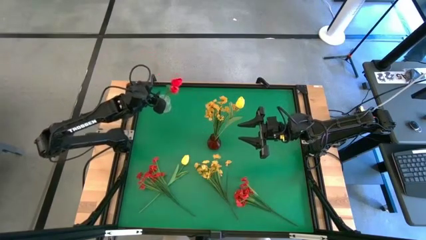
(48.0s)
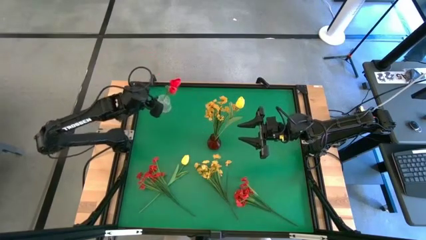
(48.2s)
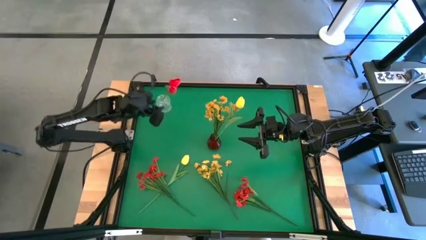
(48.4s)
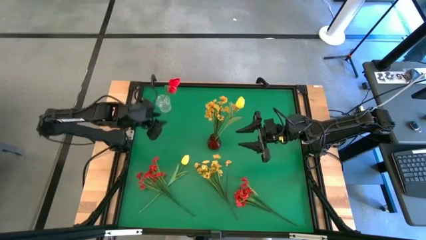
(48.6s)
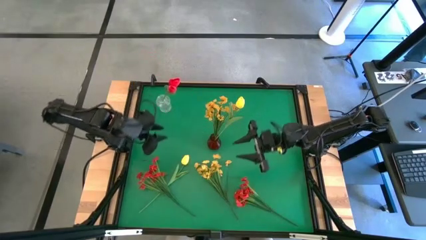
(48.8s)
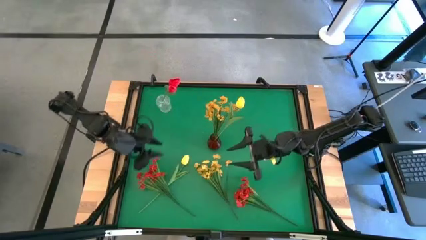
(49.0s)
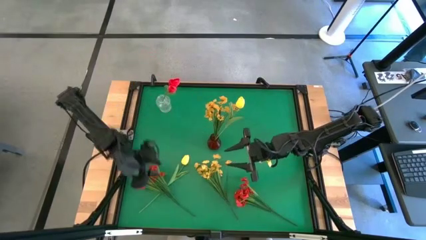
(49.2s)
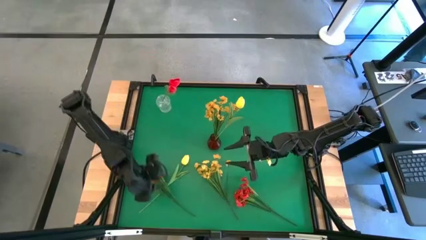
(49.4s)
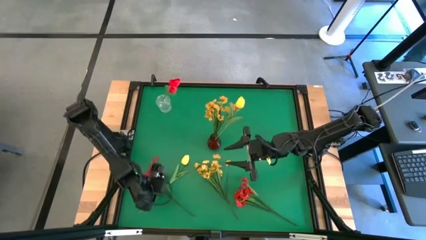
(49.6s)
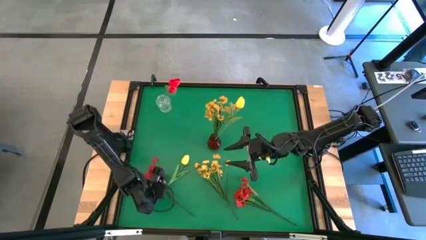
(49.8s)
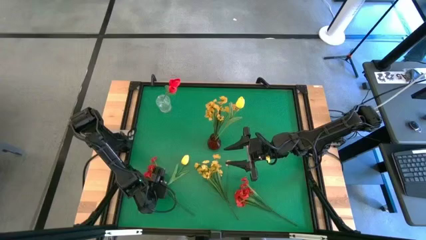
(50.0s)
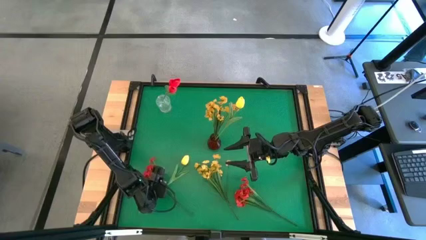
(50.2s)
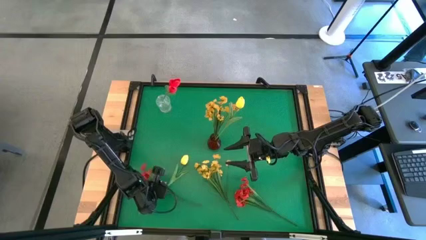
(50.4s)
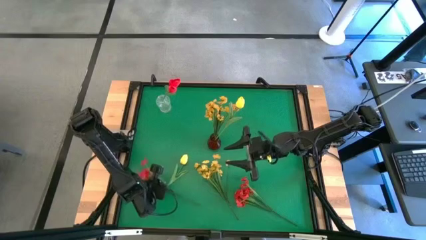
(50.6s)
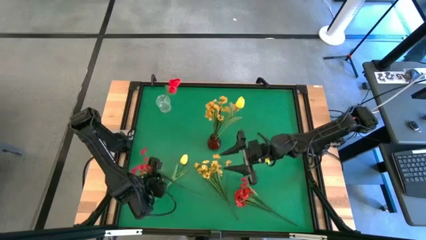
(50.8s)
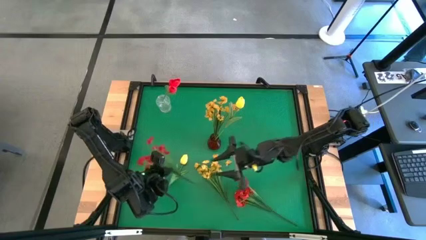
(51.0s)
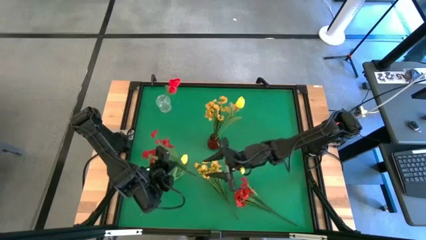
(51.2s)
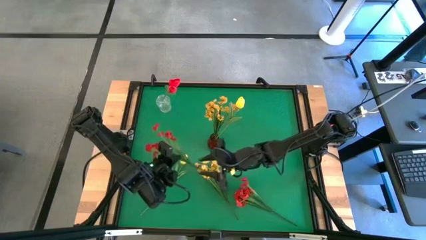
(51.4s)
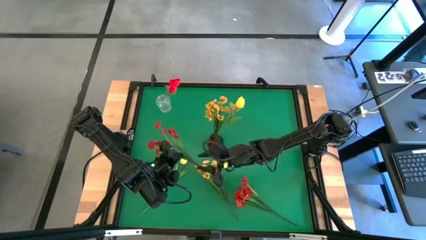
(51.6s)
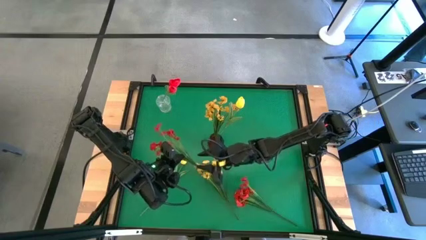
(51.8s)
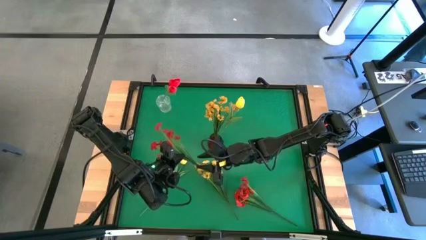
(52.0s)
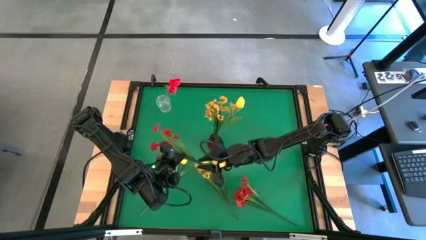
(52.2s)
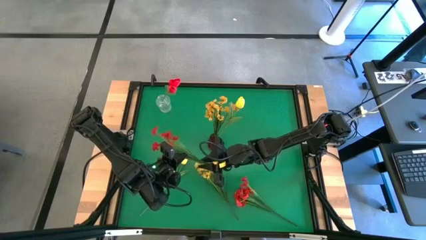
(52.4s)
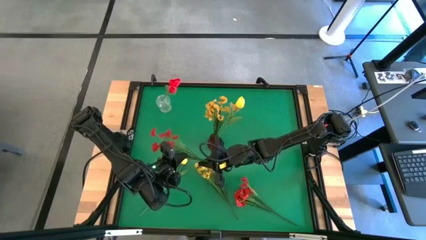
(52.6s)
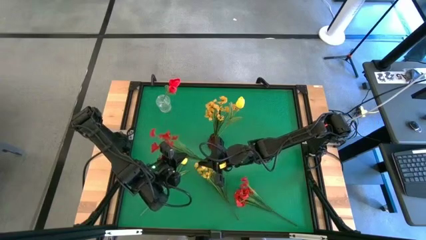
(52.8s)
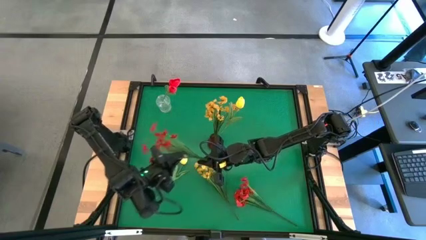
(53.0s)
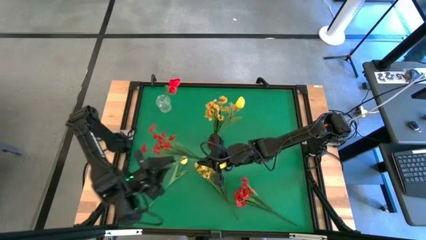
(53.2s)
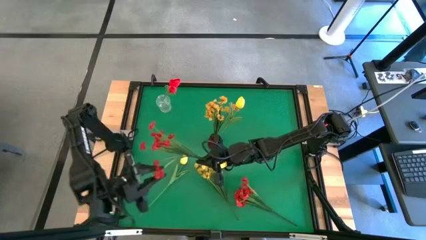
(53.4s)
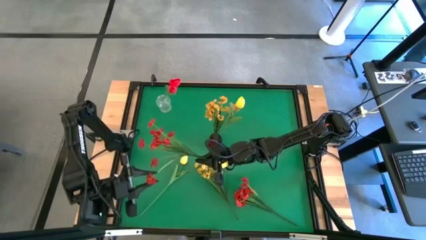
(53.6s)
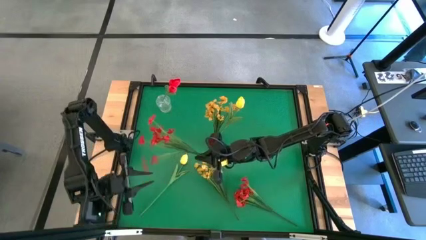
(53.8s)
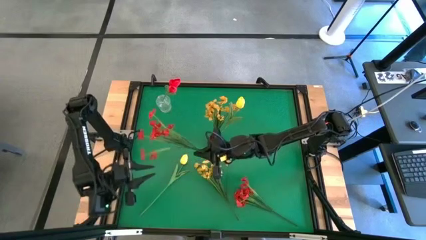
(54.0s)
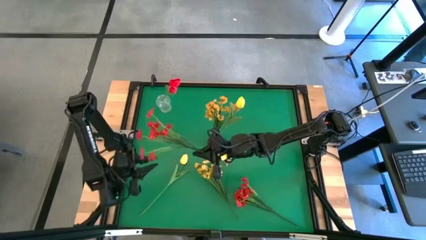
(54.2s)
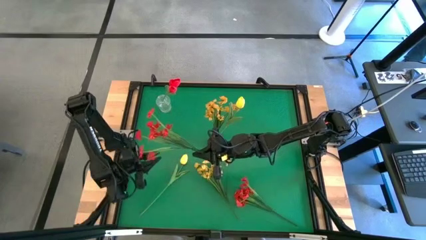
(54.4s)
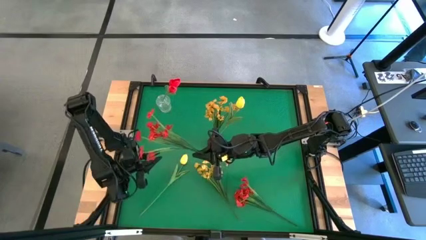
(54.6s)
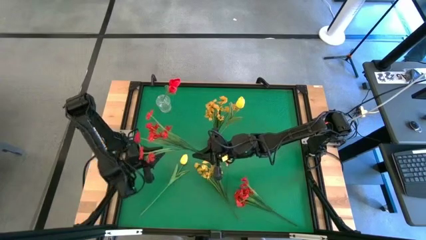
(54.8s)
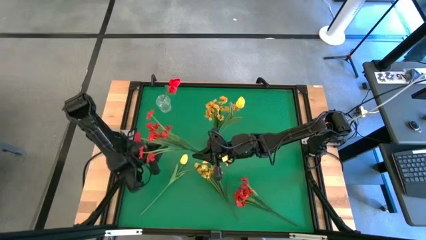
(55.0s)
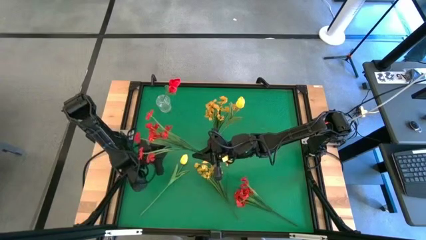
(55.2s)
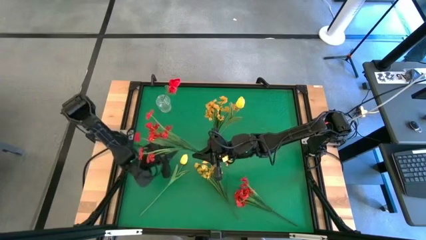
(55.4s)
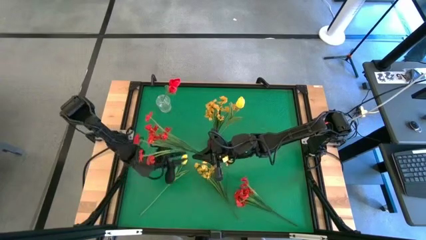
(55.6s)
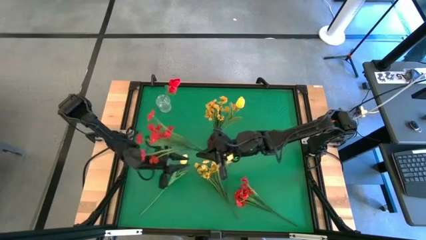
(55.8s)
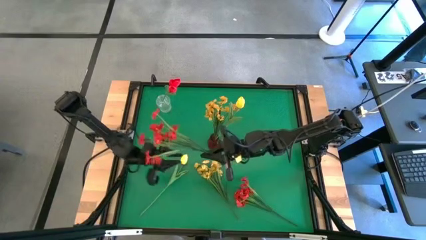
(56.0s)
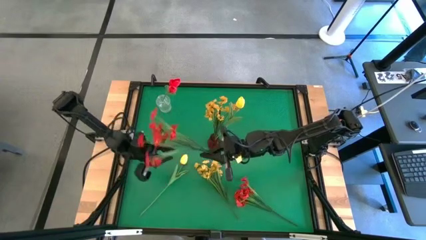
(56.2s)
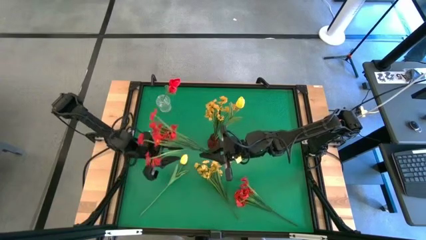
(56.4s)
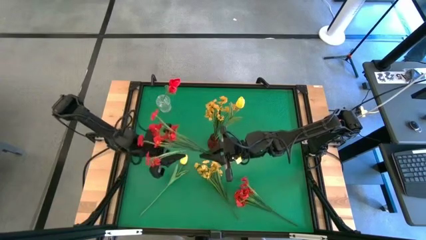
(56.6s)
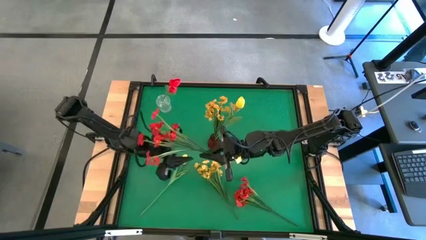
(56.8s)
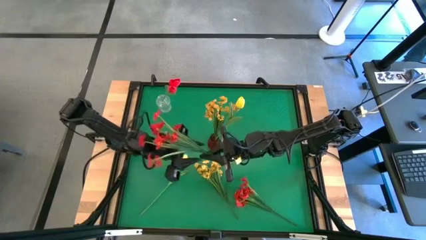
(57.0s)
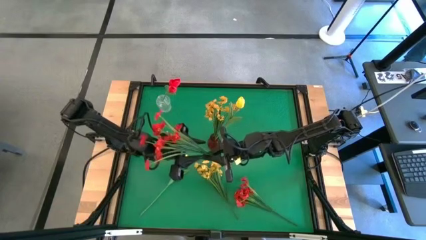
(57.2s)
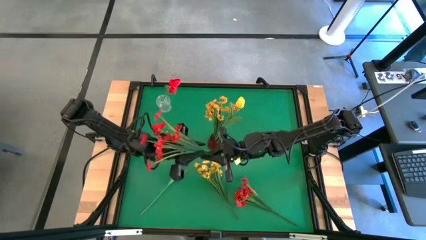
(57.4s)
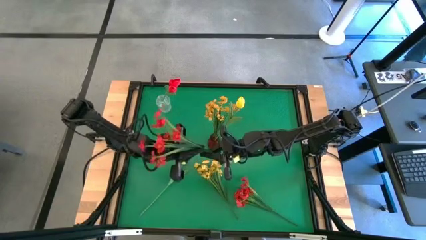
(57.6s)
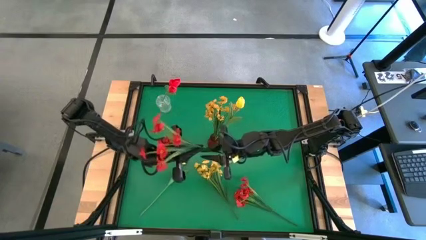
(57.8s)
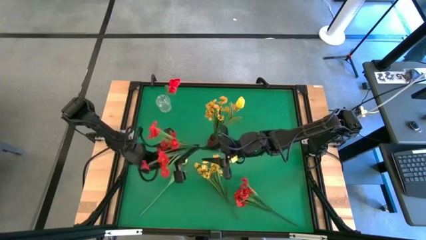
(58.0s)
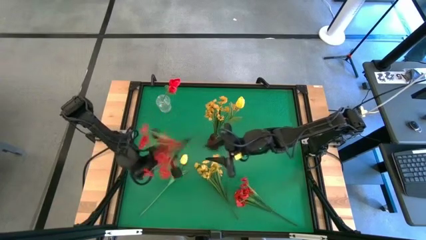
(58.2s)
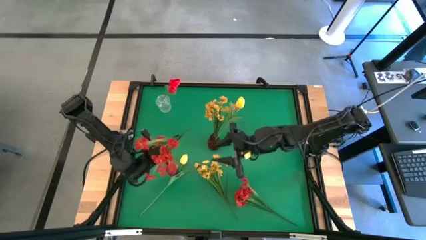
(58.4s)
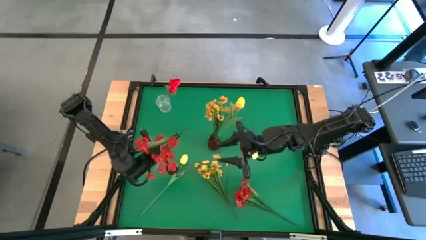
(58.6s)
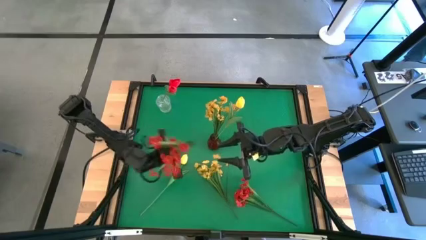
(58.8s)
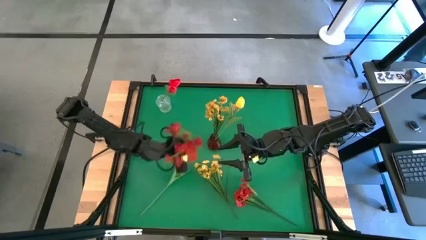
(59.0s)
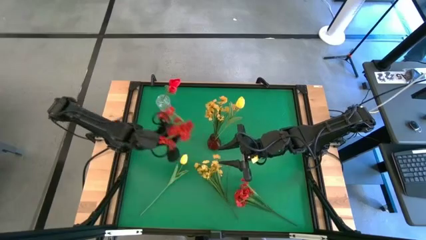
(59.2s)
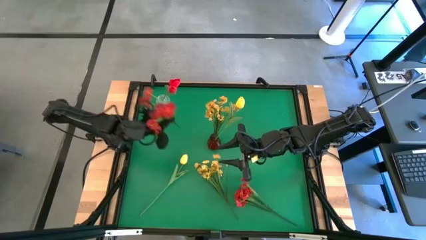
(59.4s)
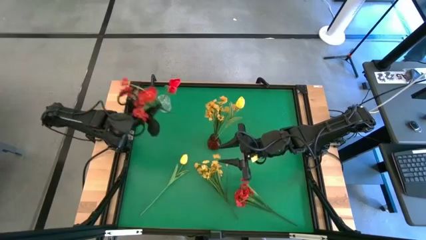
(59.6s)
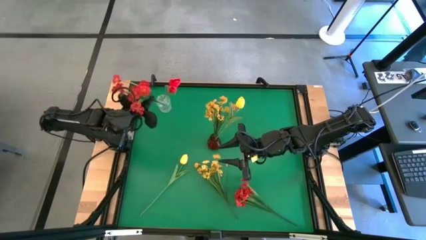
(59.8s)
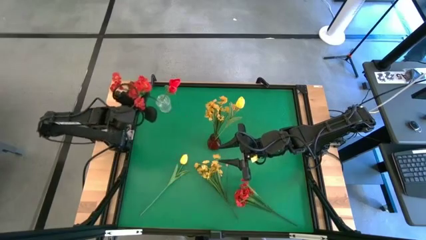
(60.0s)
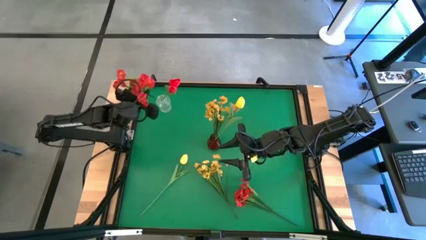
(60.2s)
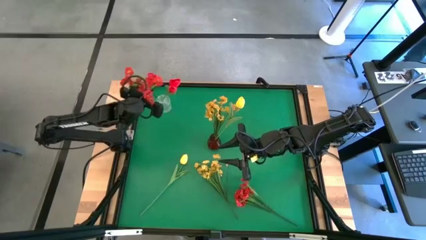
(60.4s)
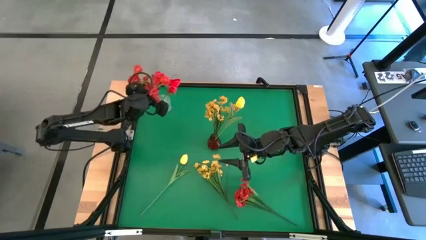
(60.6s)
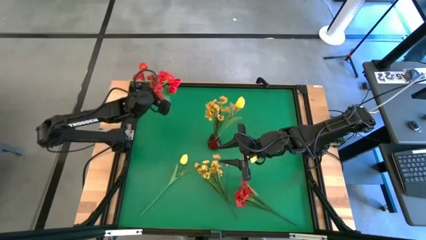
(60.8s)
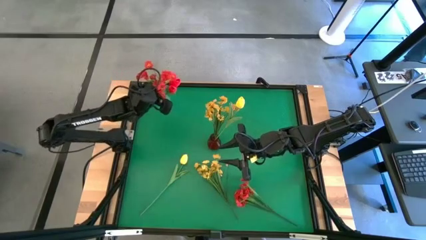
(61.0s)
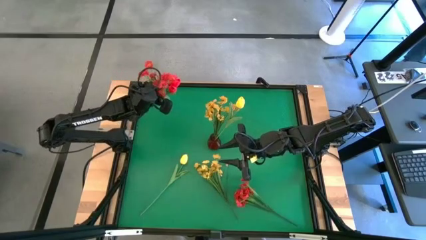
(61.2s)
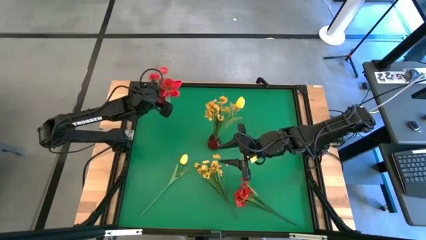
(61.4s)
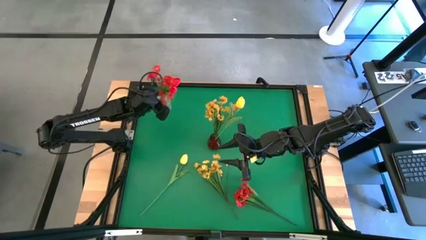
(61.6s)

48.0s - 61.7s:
Task: Sort flowers into vase by color
Put the left red flowers into the transparent vase
